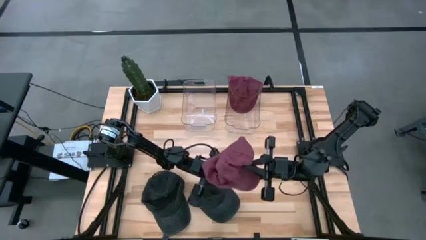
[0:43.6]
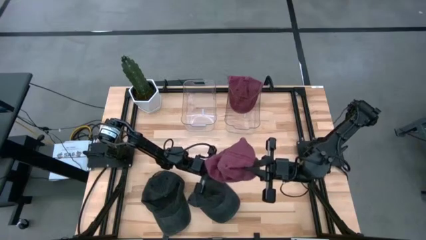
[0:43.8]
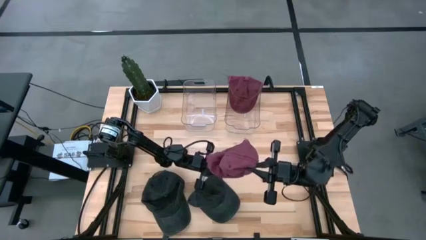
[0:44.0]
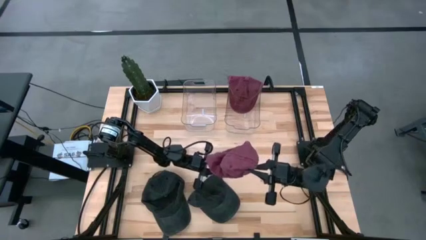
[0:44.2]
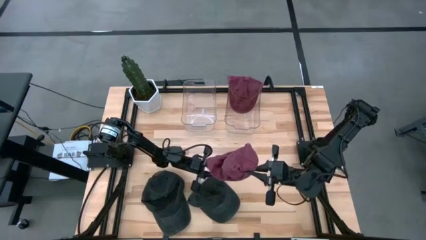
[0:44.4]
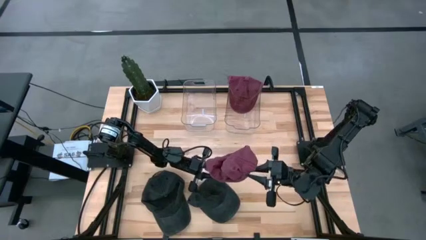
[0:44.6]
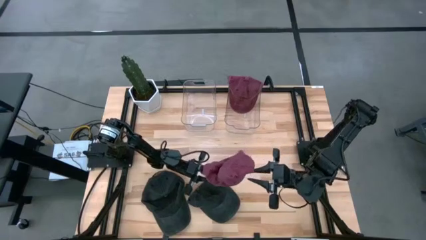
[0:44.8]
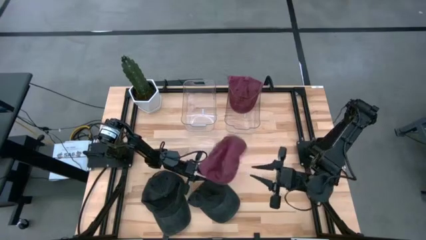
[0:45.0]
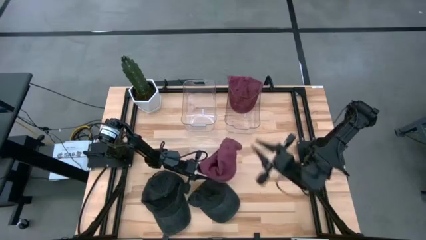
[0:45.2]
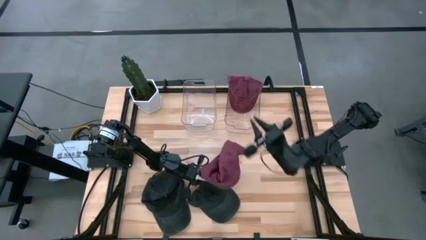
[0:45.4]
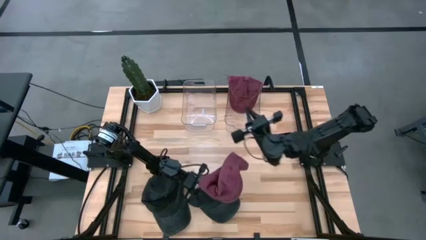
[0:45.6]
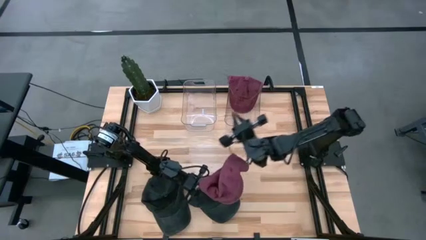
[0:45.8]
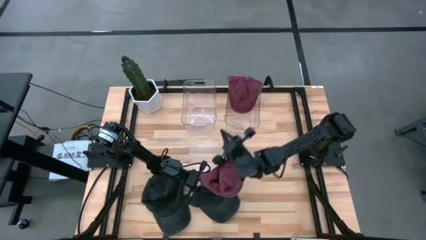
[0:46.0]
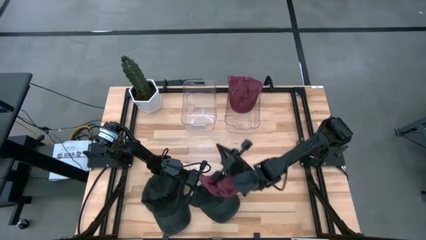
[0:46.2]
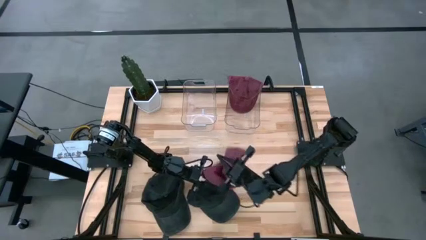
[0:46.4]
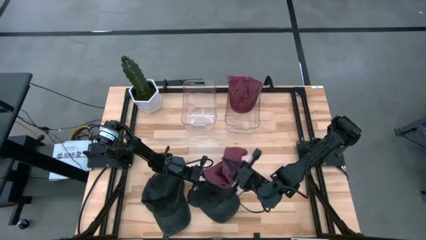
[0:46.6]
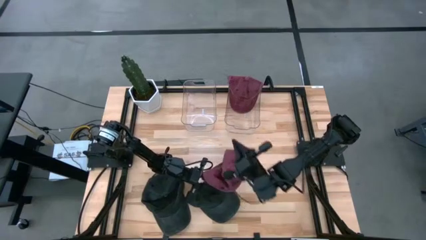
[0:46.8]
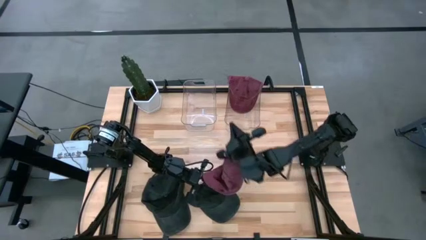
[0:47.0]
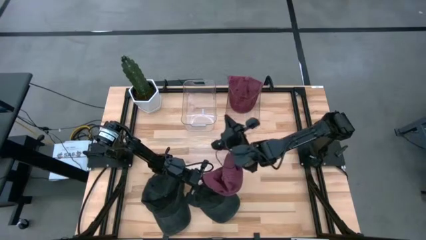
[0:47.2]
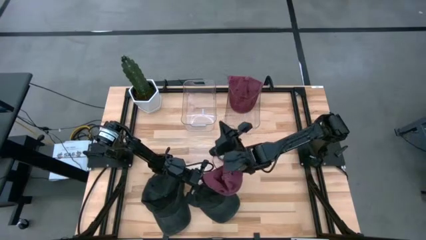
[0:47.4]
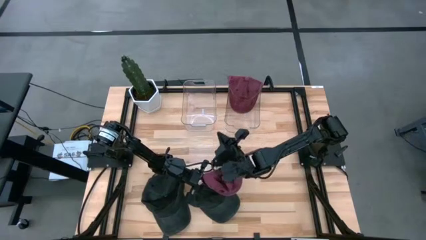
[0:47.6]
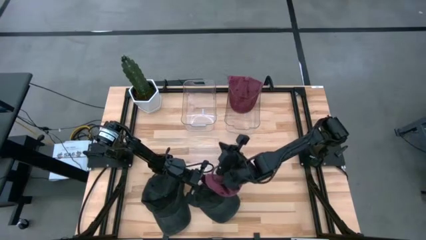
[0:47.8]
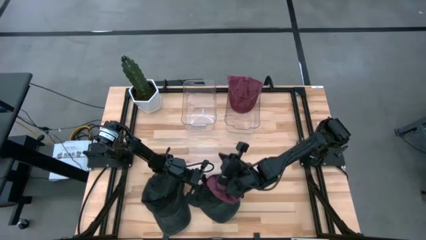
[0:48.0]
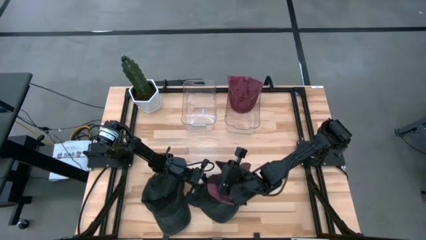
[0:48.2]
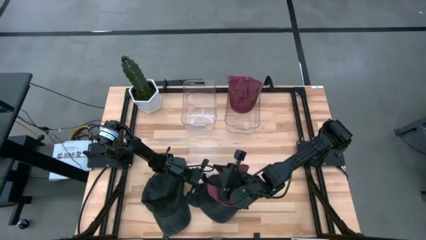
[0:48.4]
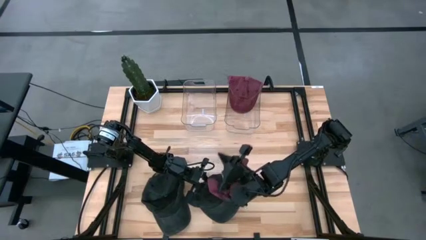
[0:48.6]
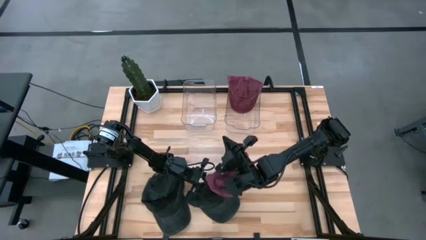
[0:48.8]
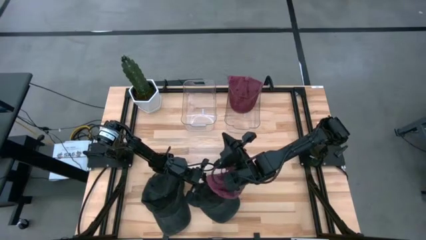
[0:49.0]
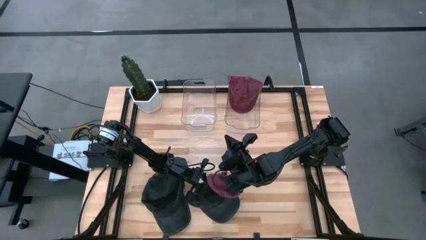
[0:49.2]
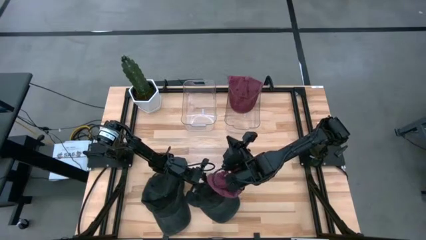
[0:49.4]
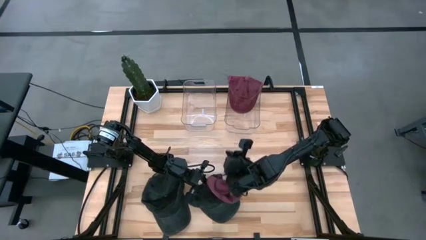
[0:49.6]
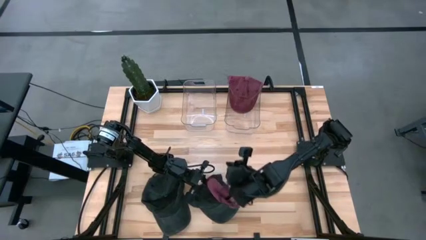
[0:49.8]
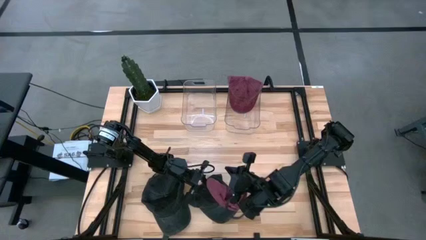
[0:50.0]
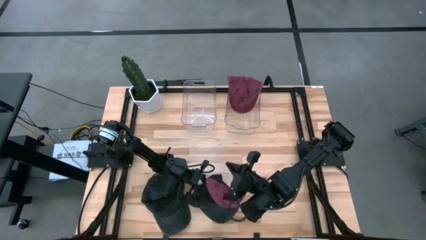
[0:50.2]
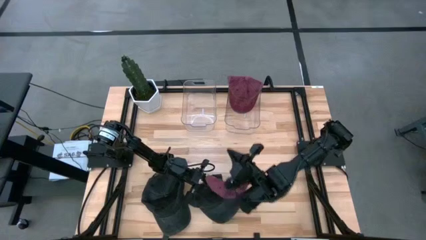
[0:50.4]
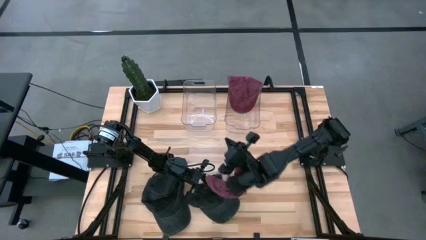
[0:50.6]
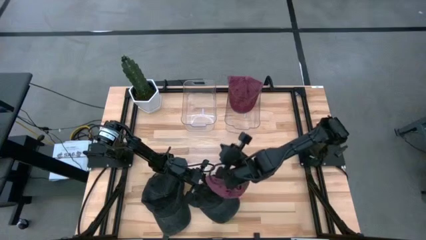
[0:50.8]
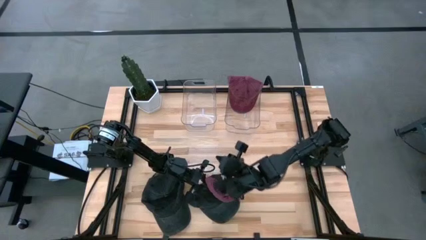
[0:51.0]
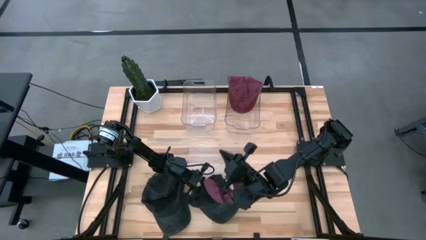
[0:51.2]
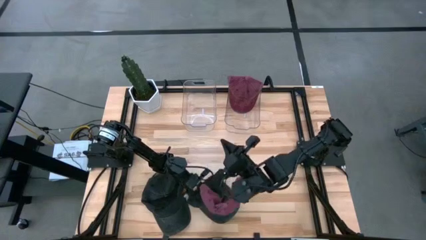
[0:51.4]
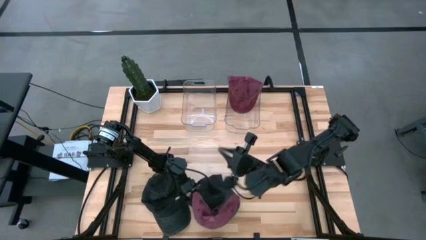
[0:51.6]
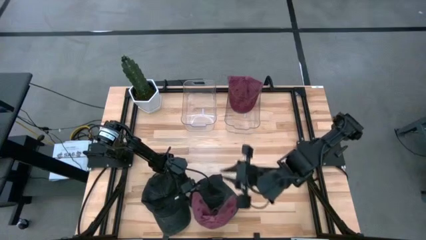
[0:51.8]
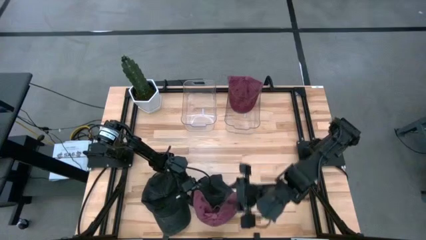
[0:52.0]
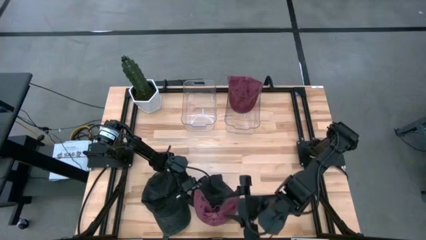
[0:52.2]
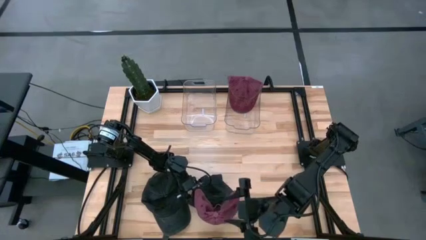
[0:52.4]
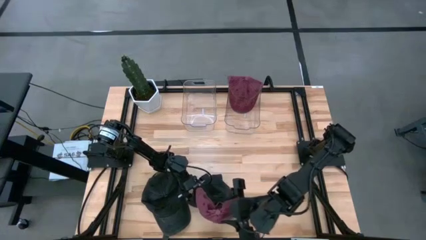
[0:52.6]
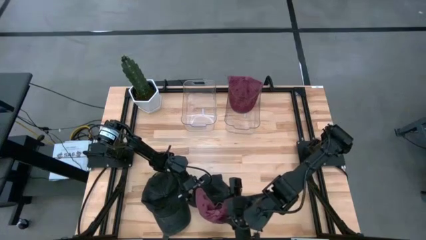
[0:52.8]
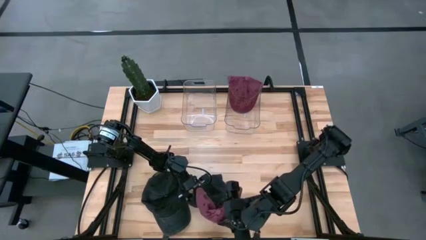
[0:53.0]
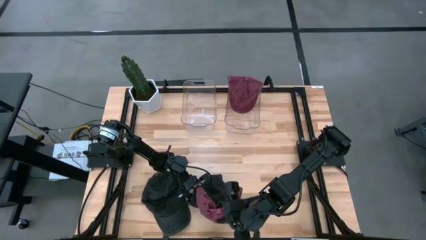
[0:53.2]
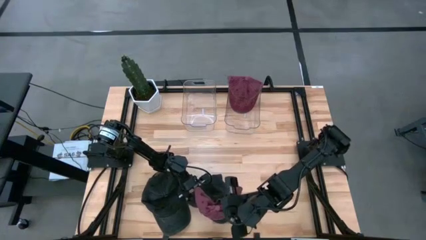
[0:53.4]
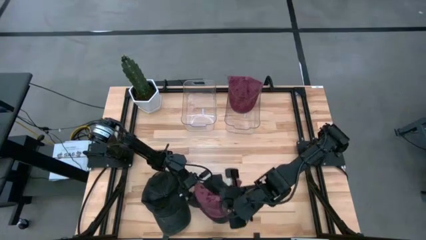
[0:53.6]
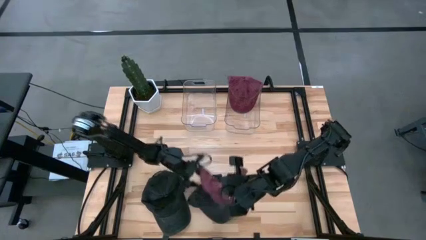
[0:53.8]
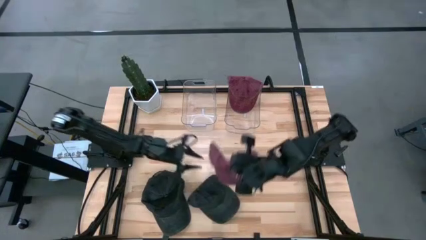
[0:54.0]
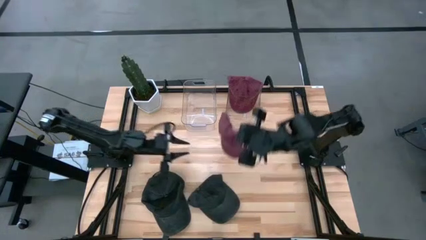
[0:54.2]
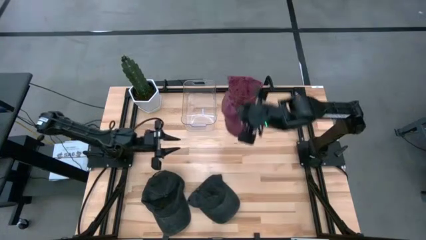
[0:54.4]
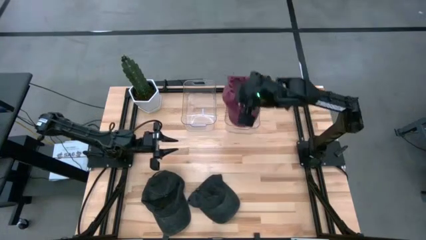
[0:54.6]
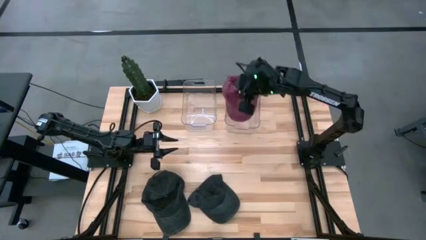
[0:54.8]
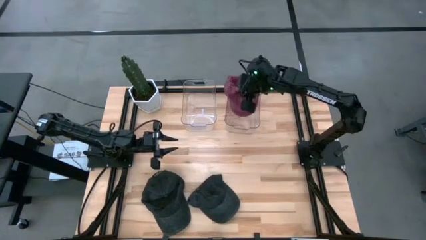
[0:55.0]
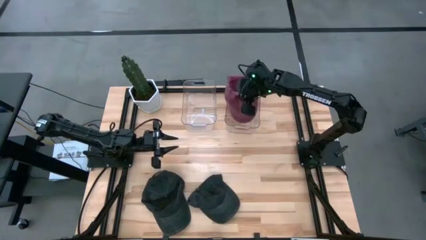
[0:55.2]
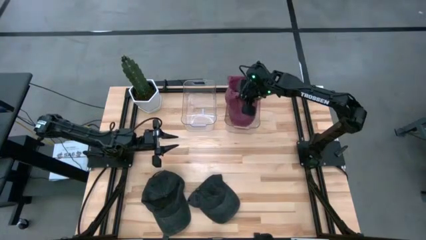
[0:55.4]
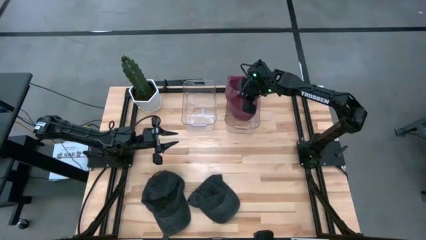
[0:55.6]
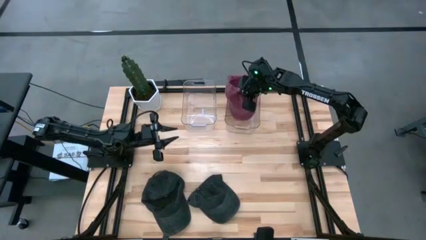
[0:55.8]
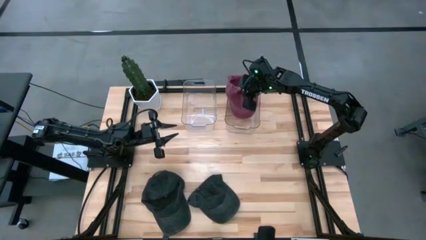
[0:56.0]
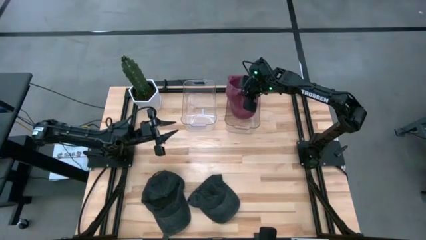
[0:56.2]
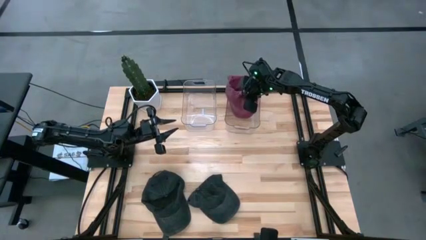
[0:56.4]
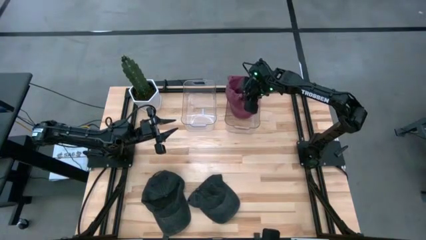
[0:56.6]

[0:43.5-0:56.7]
Task: Pick & Place hat
Put the maroon head cap into the right transparent bin
